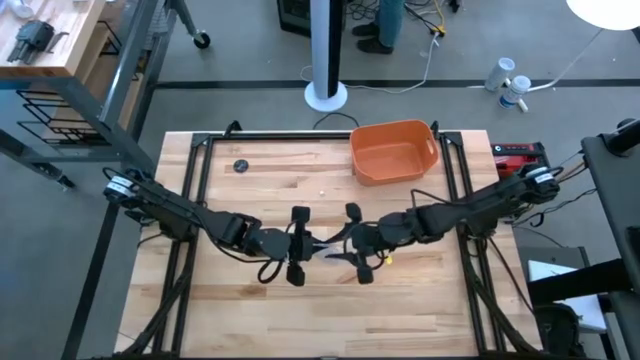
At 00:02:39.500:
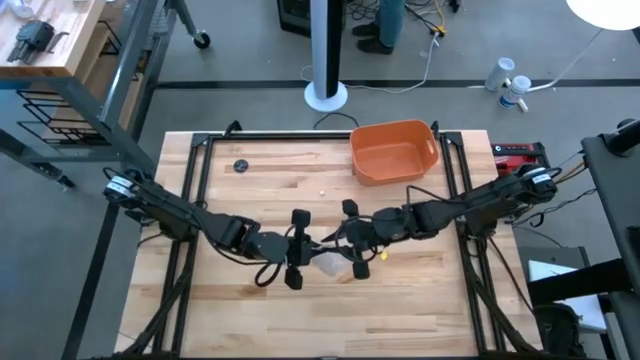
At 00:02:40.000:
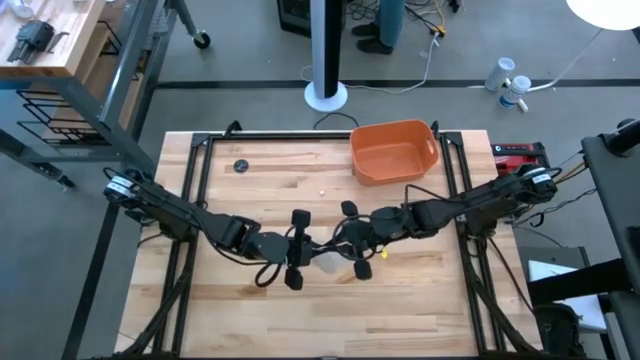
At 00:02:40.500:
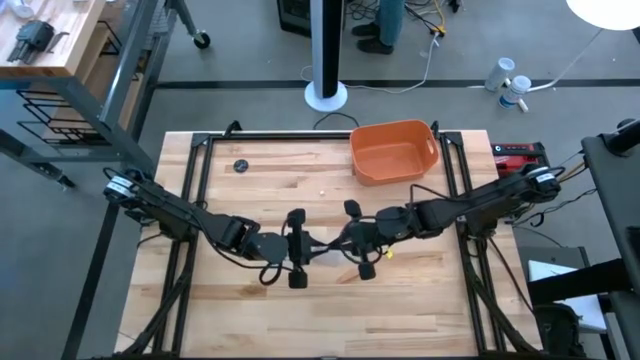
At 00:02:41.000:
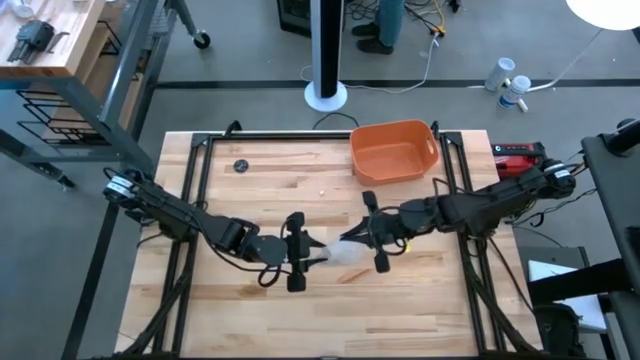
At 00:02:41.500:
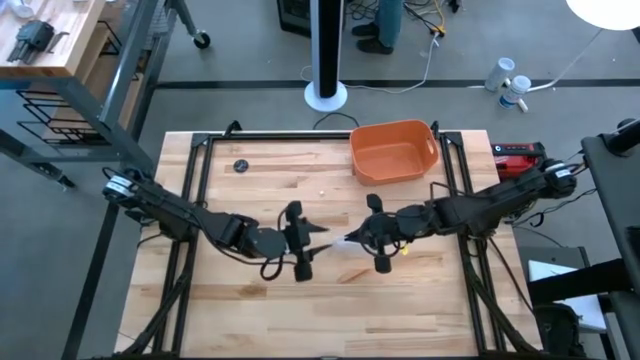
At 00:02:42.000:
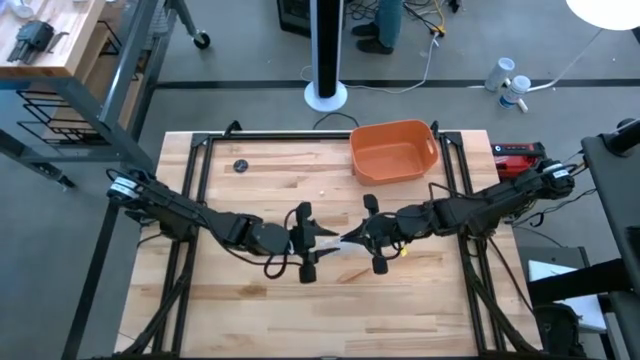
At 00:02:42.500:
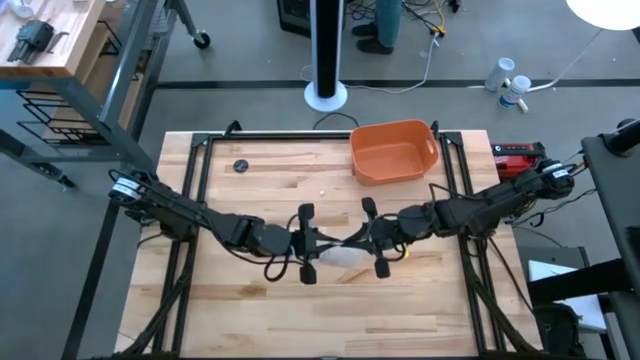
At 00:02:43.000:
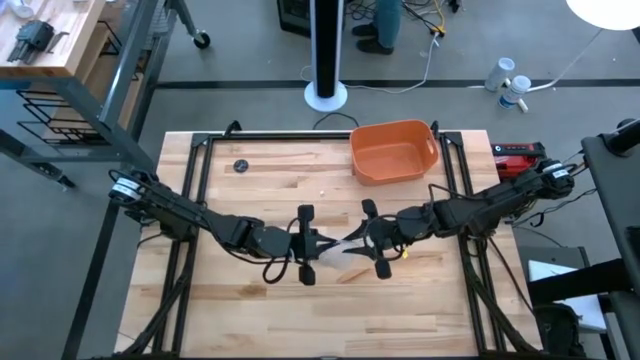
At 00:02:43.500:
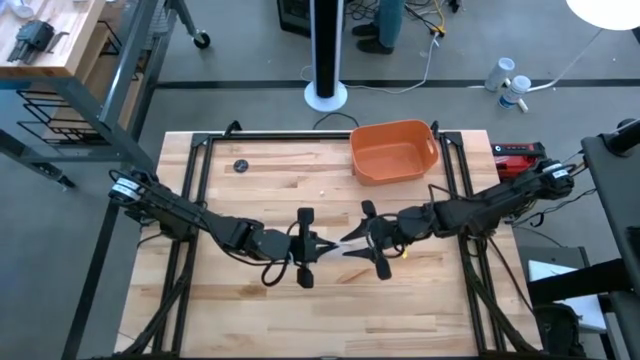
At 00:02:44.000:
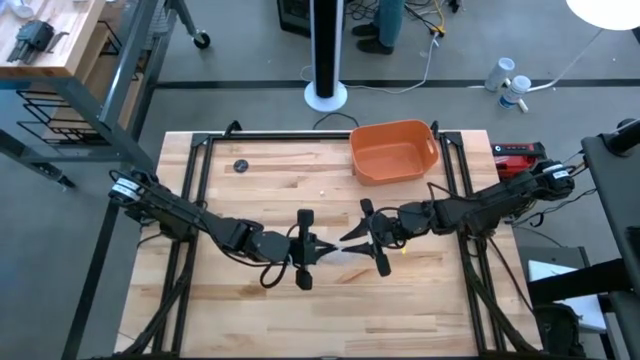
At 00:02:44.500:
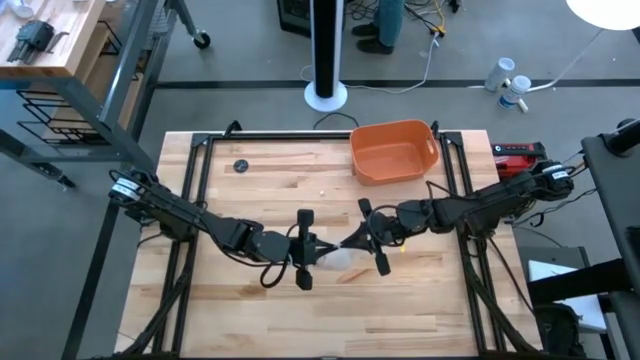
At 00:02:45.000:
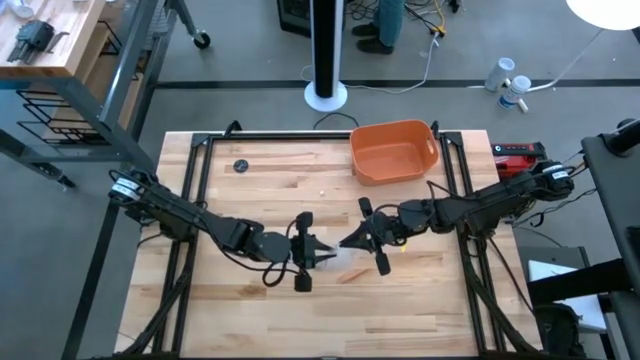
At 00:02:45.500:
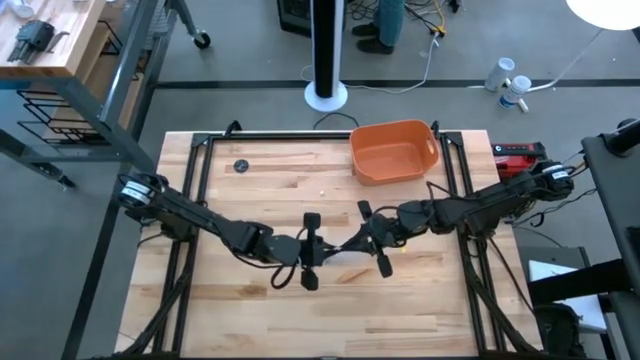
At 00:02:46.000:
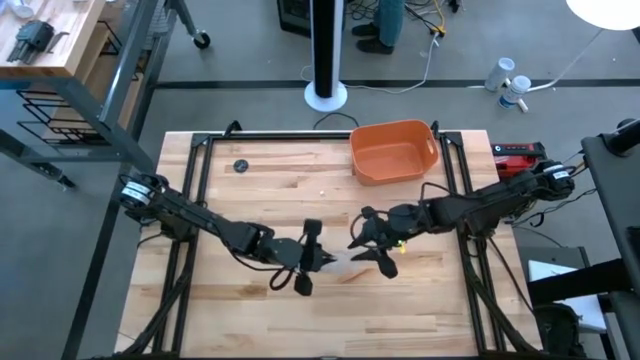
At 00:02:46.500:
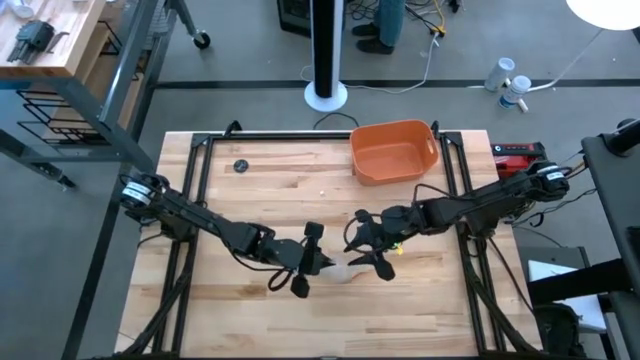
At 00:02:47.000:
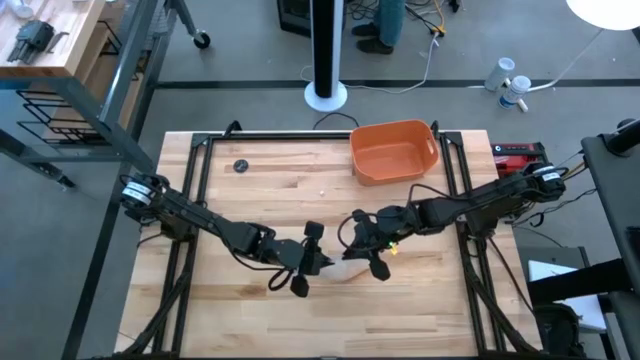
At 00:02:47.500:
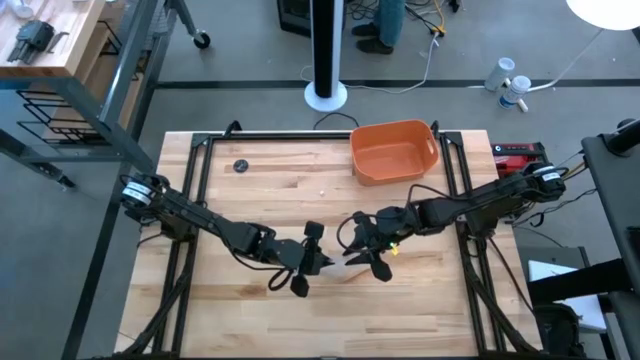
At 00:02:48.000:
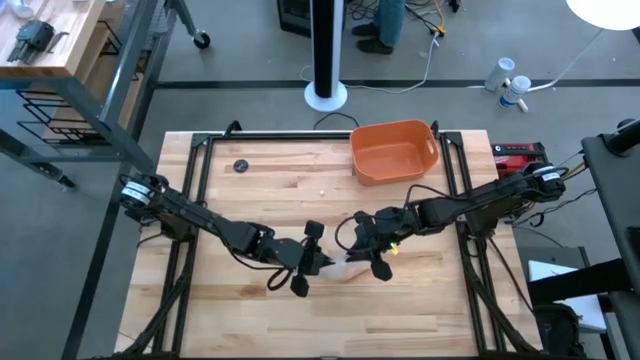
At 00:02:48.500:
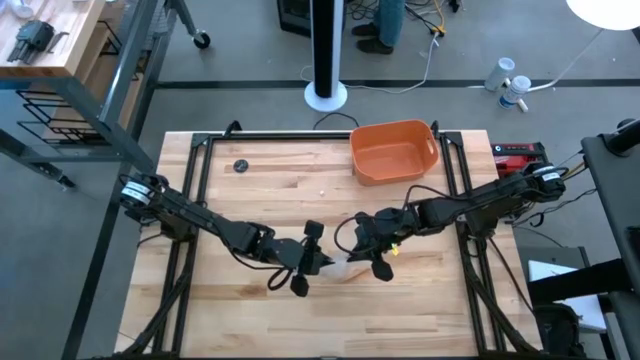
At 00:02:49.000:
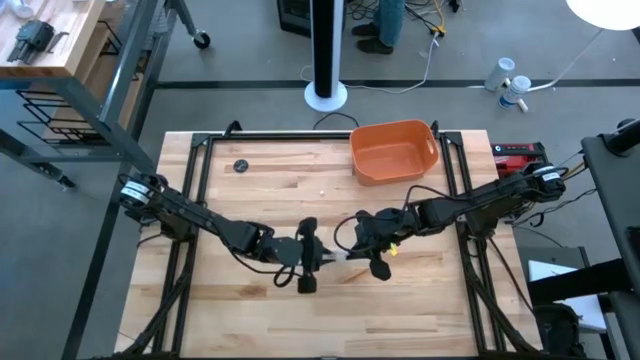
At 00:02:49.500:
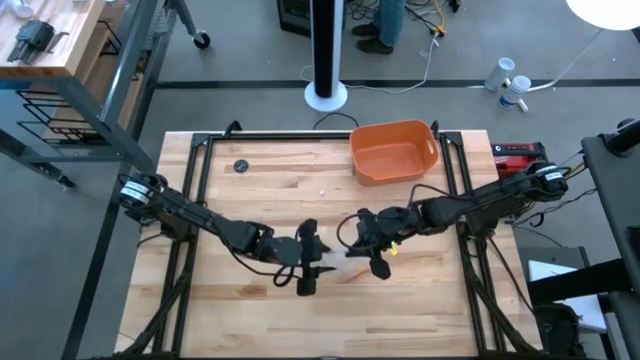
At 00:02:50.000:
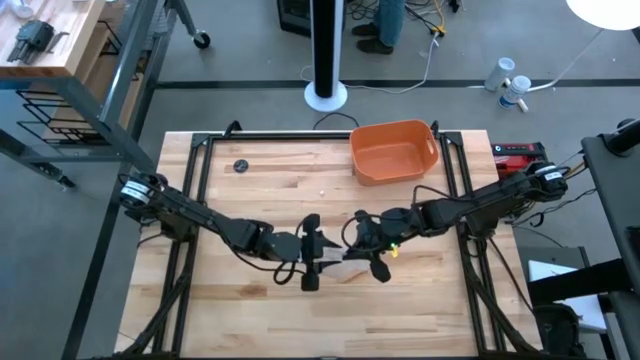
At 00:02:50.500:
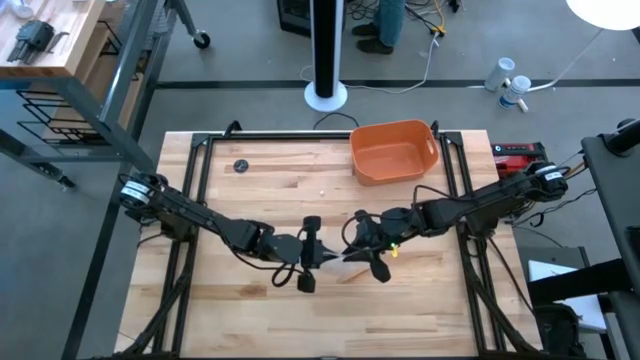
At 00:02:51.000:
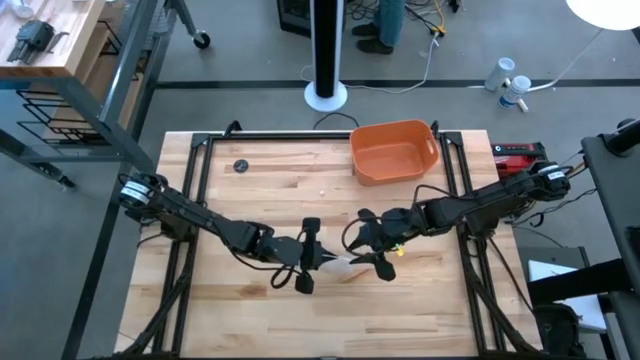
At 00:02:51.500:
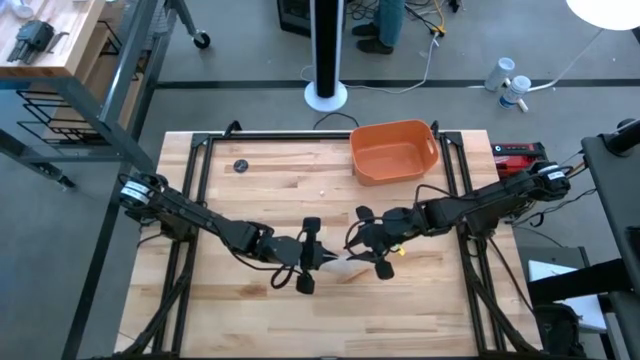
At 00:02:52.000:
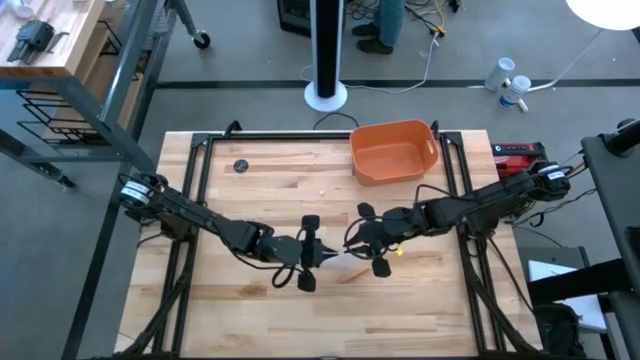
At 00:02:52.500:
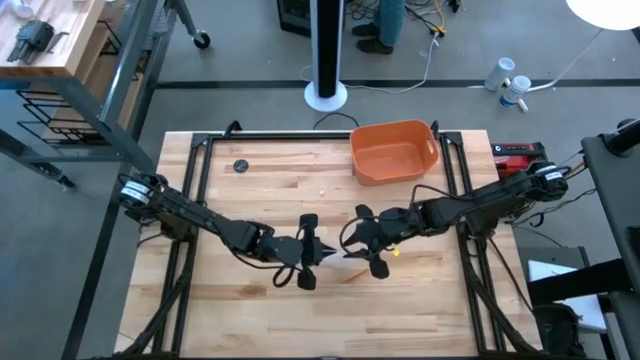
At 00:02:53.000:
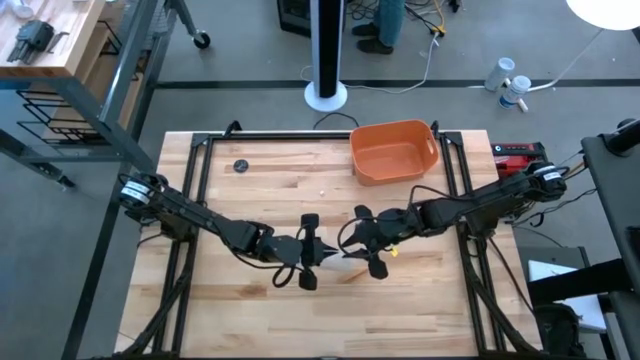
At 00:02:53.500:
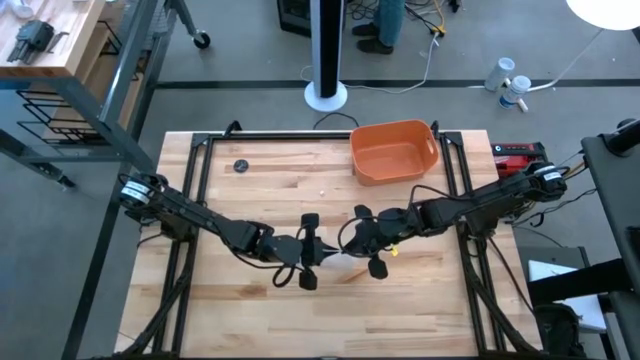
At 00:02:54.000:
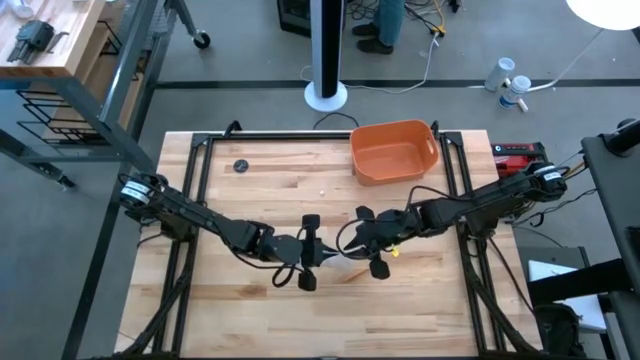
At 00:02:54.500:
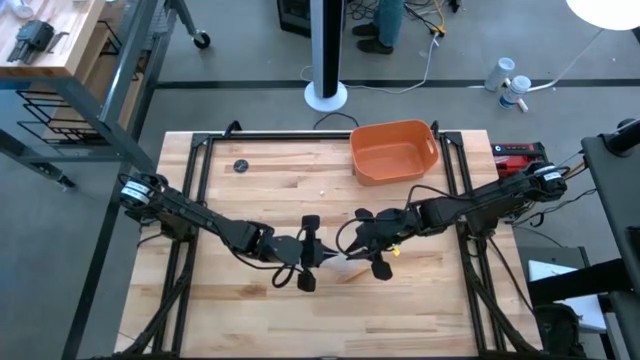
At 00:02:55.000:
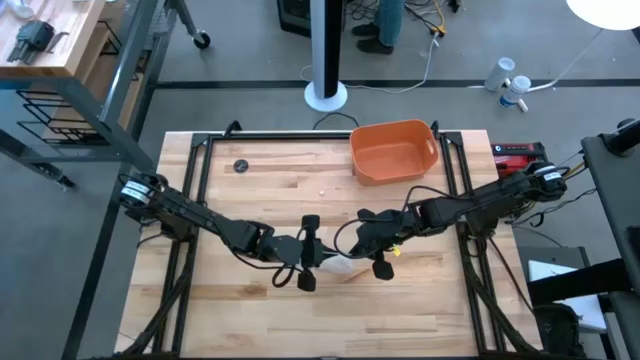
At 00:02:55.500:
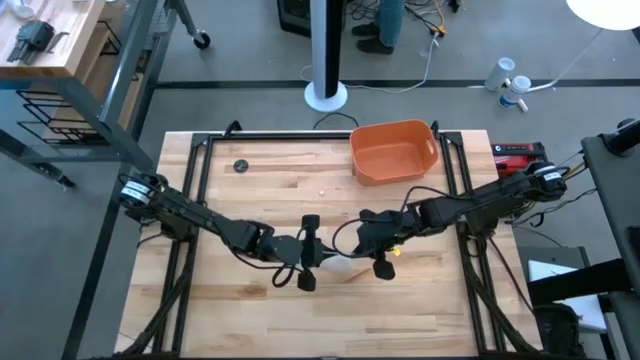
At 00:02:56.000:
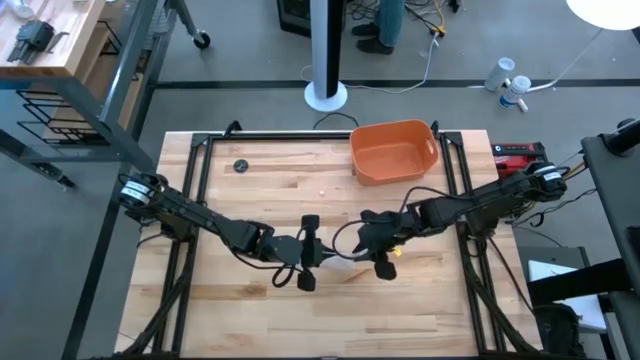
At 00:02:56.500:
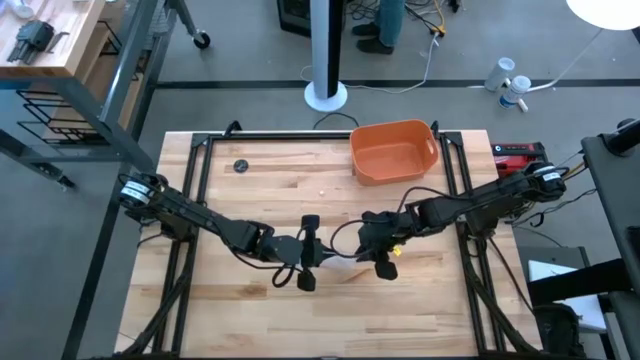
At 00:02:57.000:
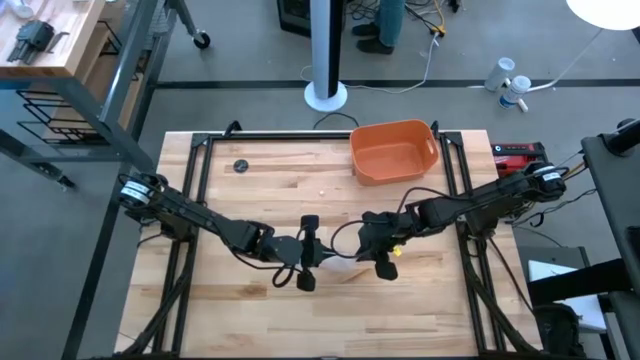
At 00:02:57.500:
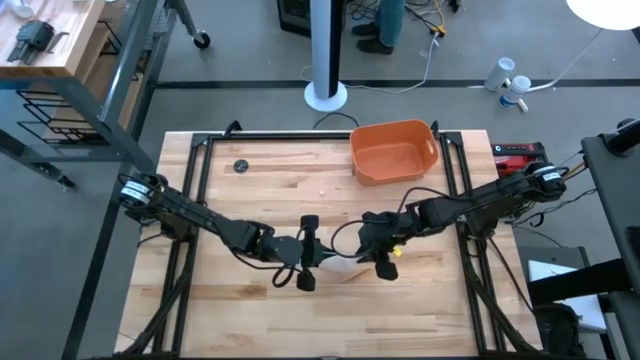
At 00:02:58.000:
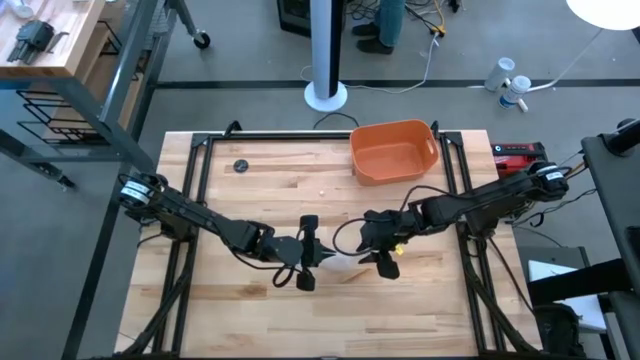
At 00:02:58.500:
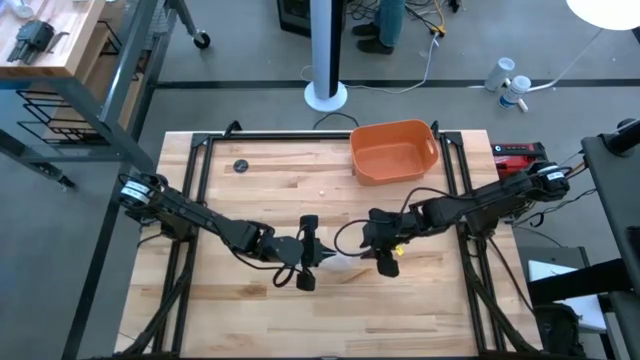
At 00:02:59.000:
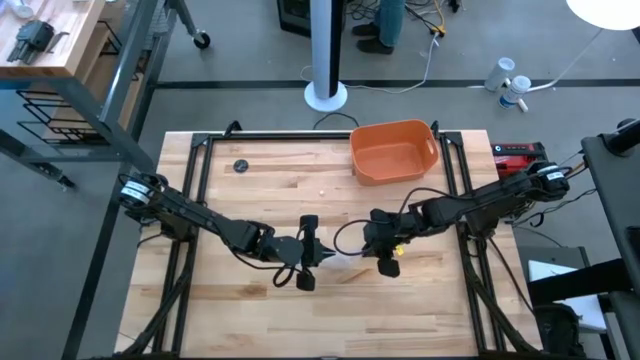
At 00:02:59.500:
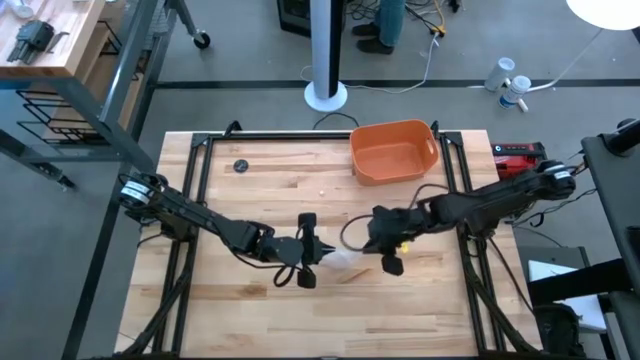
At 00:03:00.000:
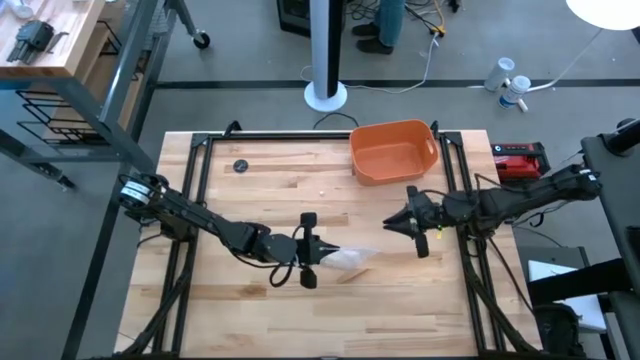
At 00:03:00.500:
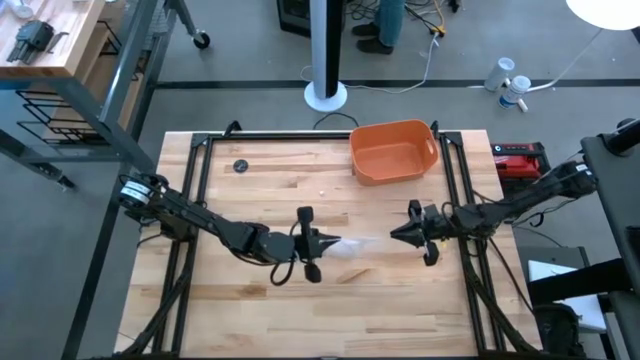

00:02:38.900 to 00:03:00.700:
Task: Roll bandage
Close the transparent zip bag
